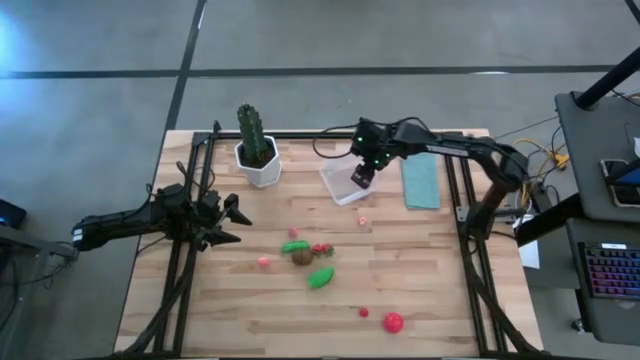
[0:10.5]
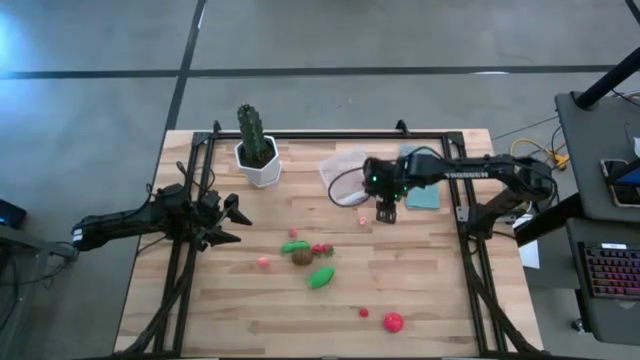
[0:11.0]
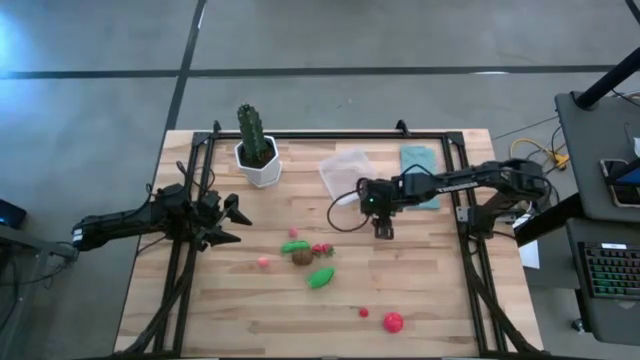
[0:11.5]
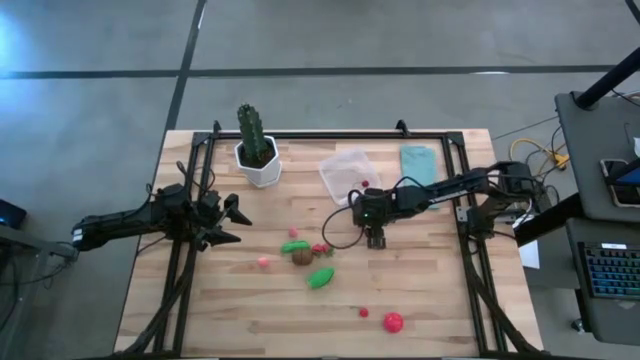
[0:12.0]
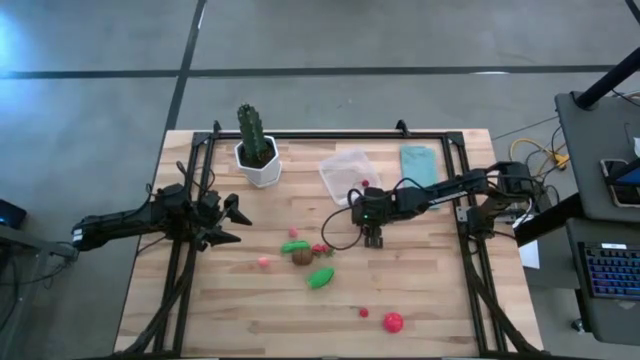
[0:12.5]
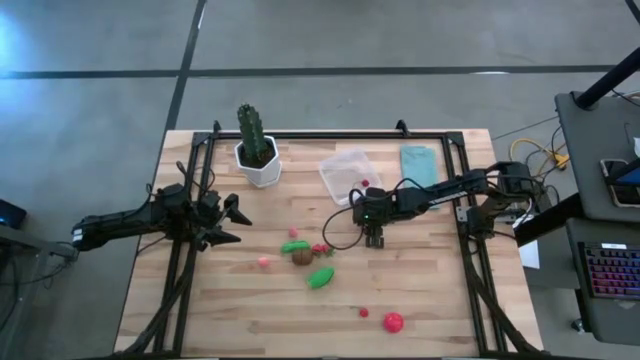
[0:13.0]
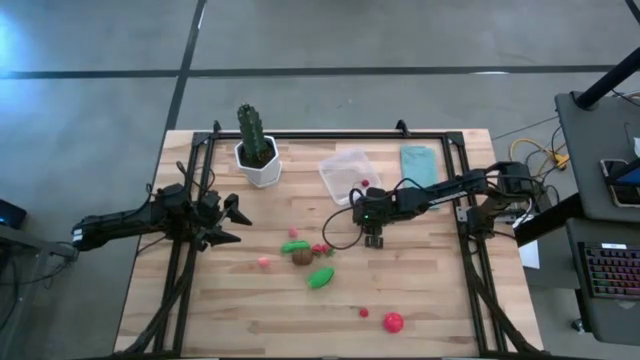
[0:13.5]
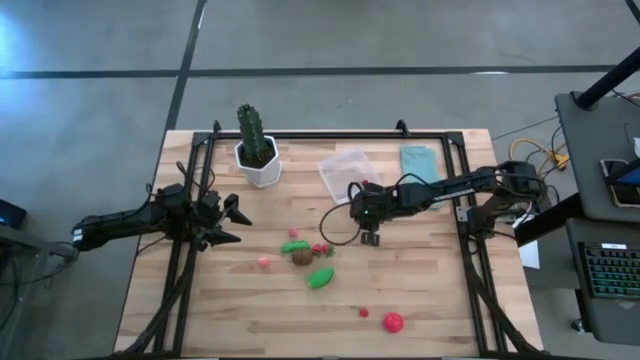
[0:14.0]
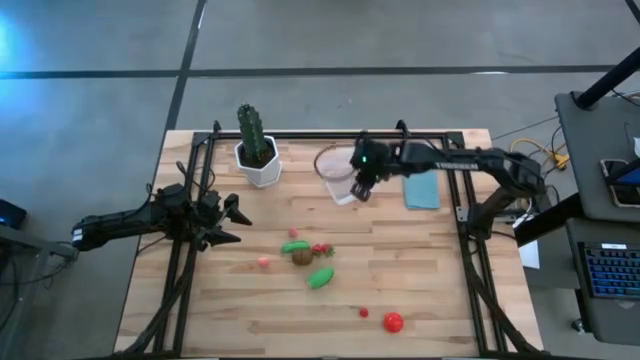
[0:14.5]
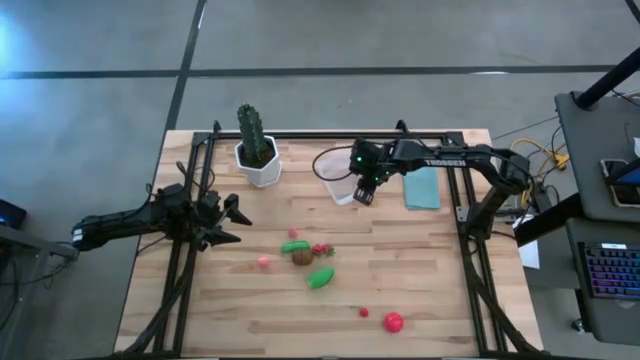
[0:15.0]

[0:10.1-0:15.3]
Task: Pick and placing Produce into tupperware
Put the top right peach into the transparent bin

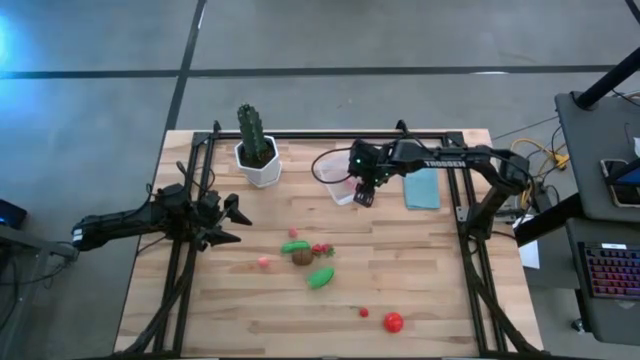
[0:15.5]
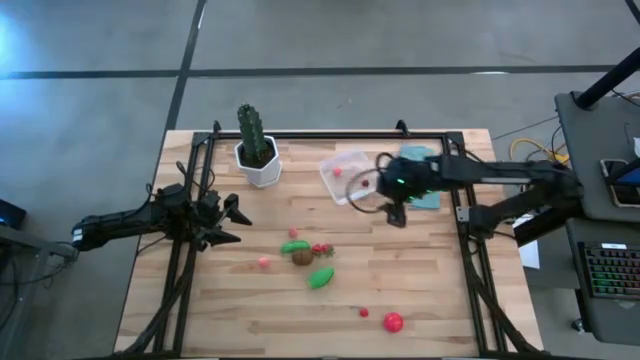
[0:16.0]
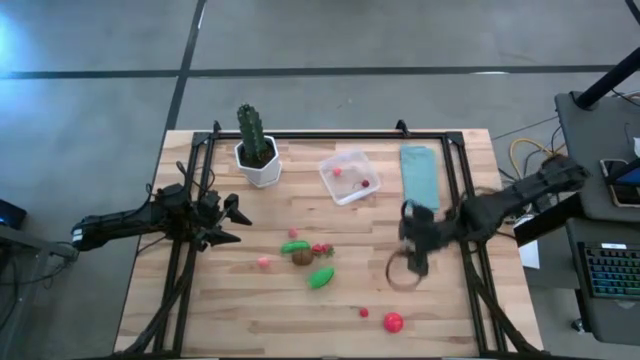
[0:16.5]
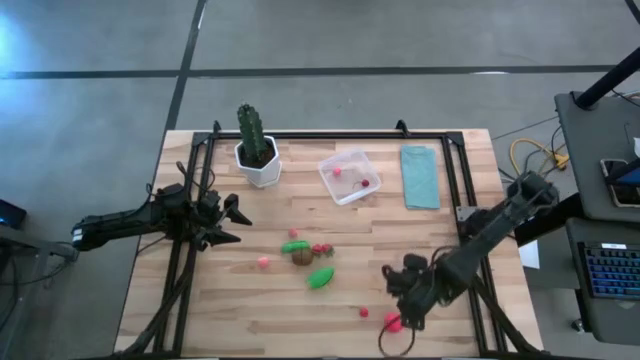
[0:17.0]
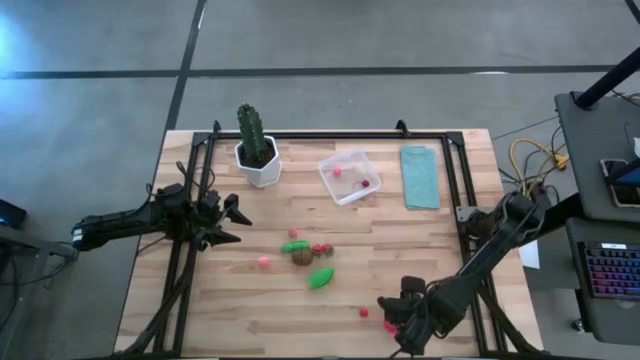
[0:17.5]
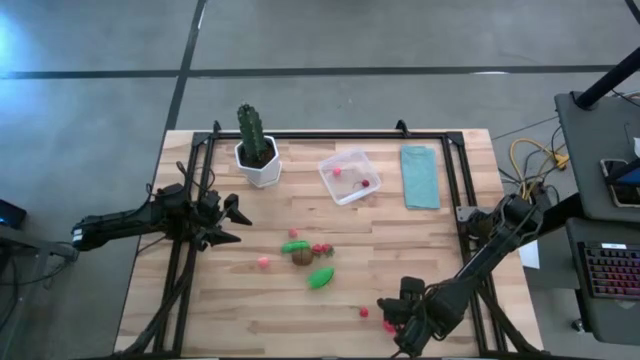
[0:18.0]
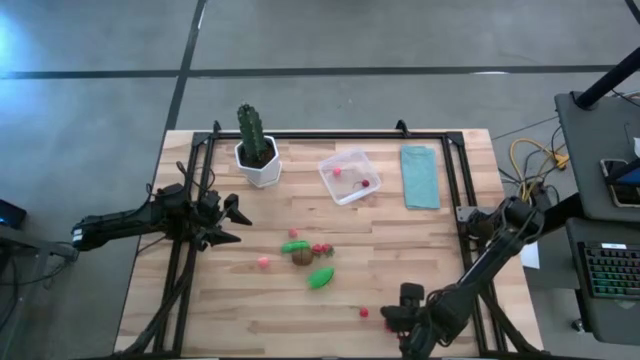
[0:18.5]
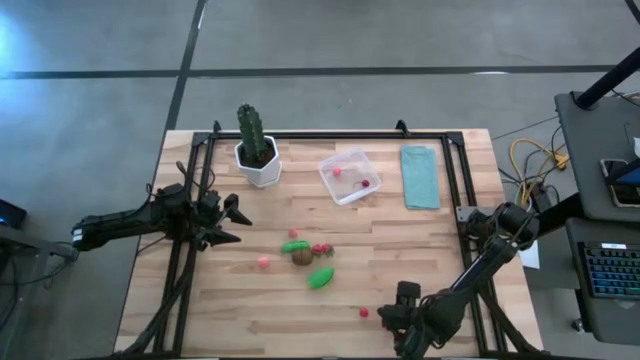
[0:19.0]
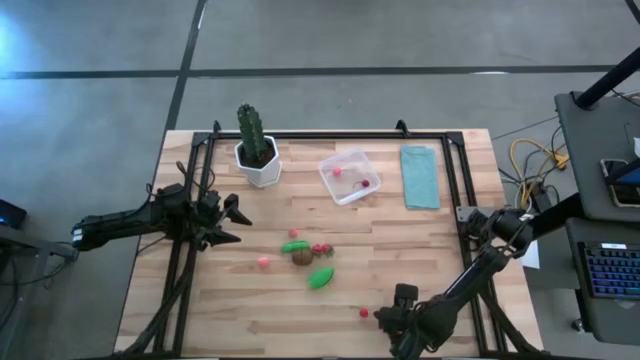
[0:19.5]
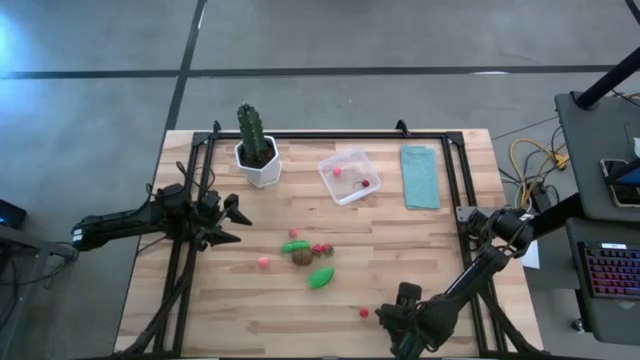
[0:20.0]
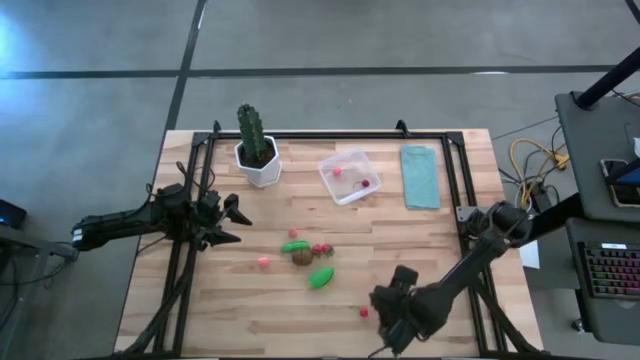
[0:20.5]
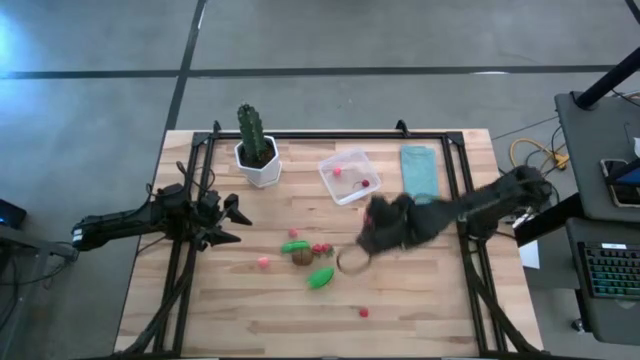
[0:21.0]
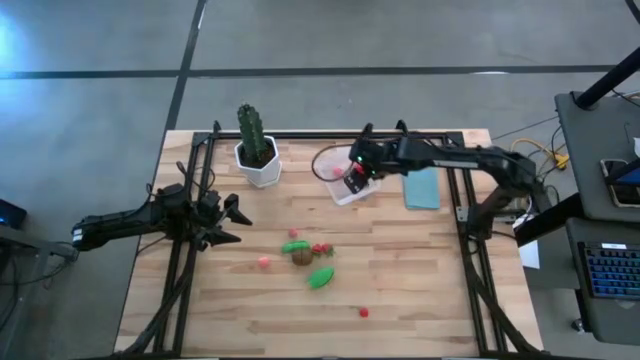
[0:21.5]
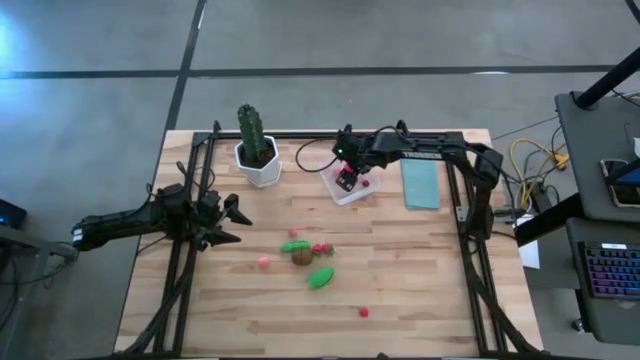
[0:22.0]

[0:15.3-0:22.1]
Put the tomato into the transparent bin

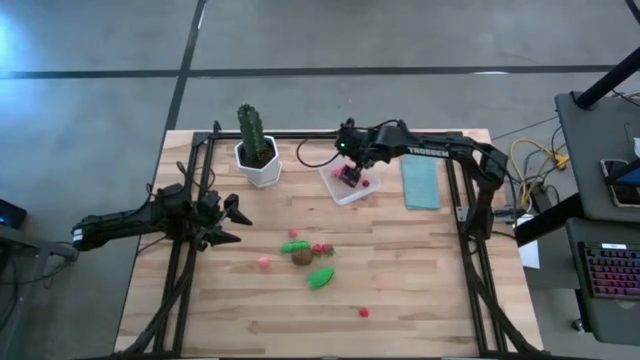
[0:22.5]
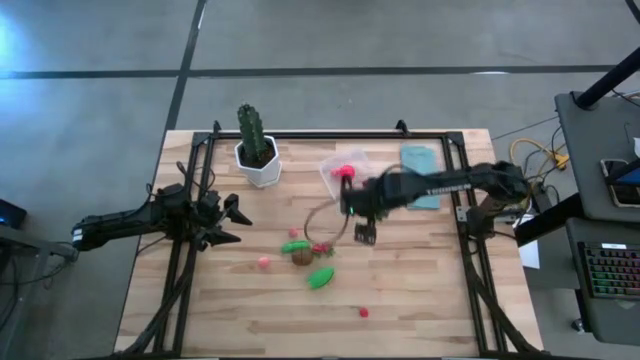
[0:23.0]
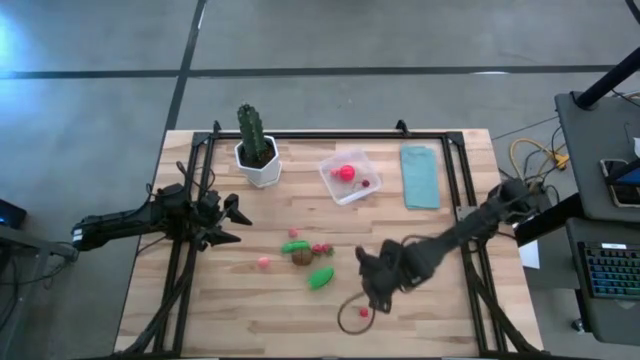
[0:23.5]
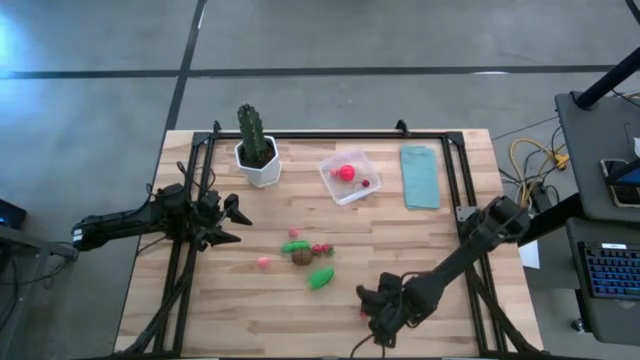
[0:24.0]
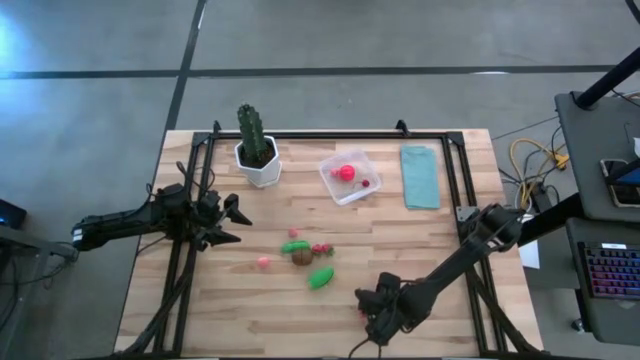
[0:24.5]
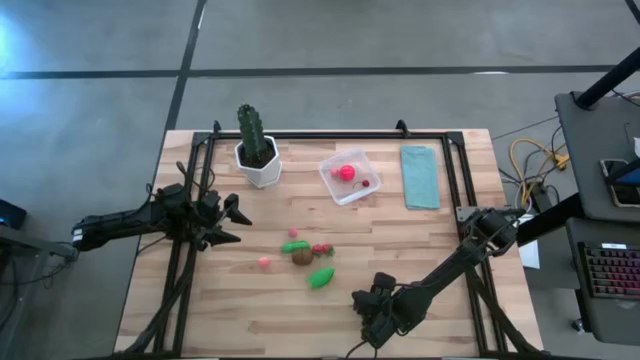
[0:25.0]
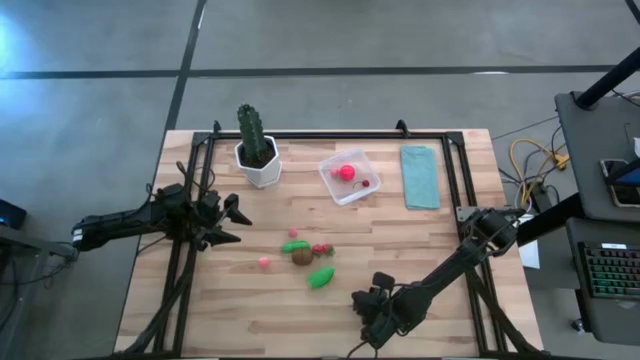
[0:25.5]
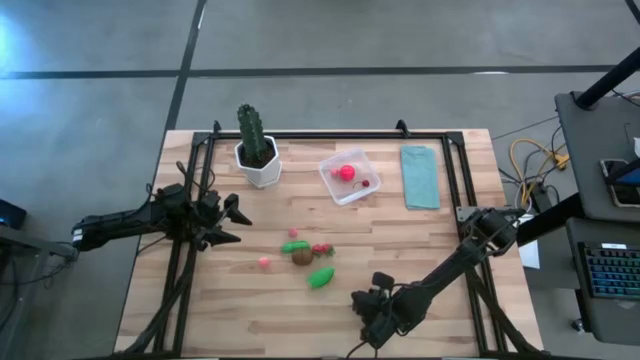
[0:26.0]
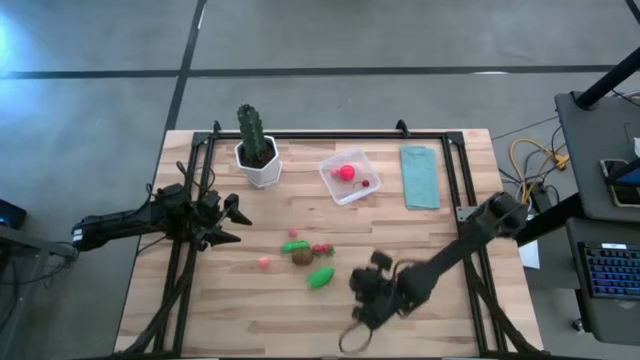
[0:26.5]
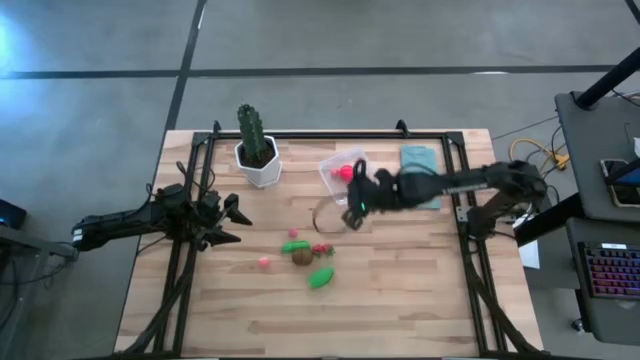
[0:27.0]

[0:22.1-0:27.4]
Put the cherry into the transparent bin

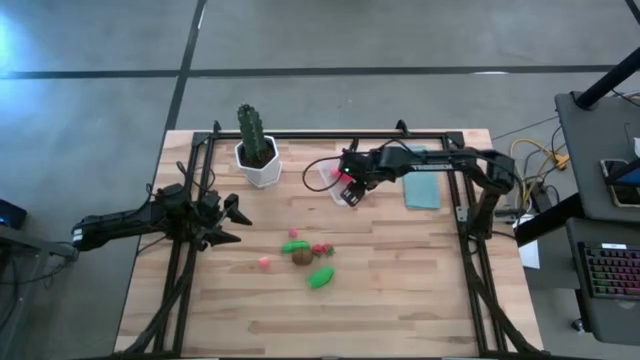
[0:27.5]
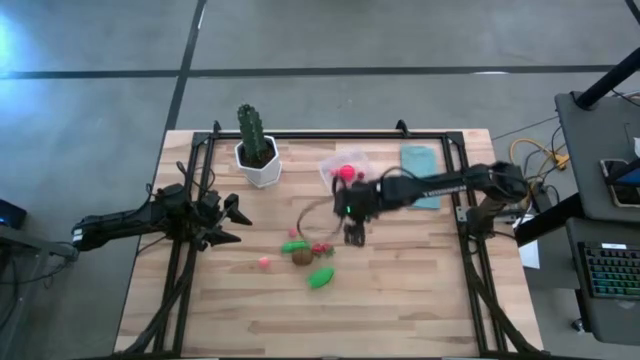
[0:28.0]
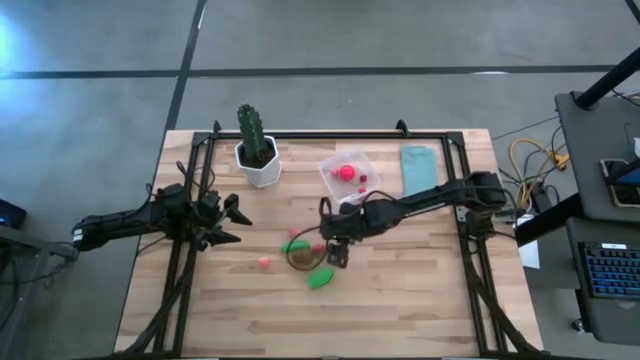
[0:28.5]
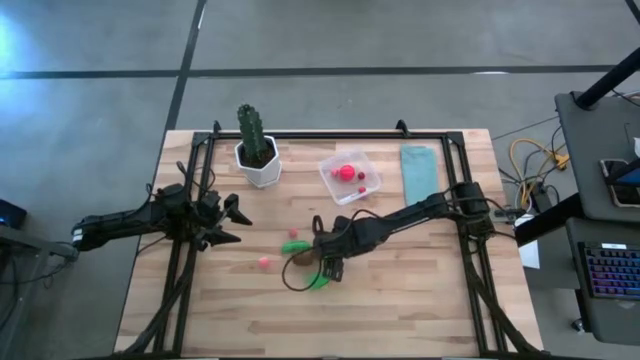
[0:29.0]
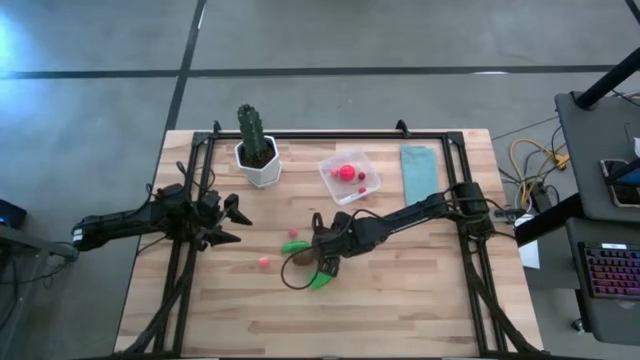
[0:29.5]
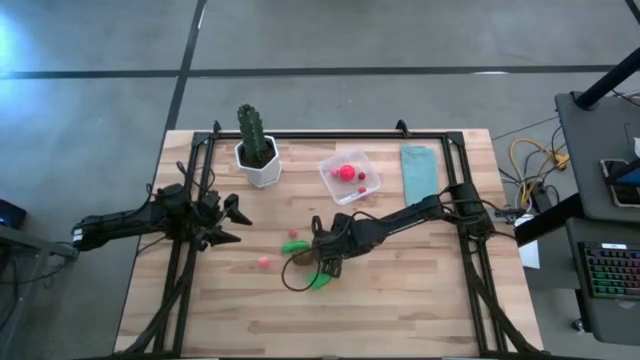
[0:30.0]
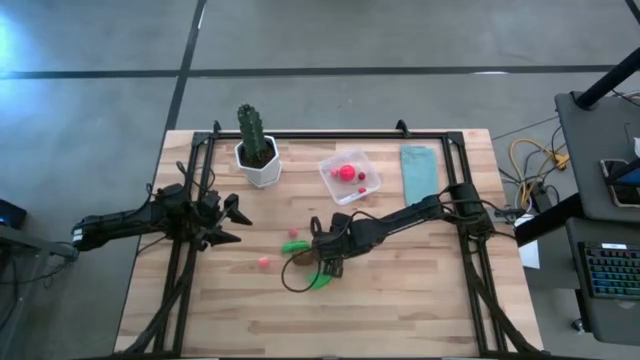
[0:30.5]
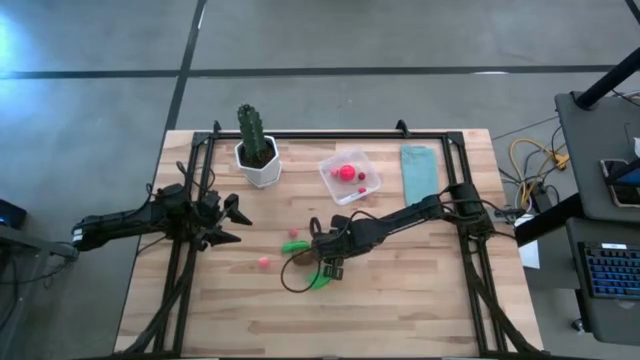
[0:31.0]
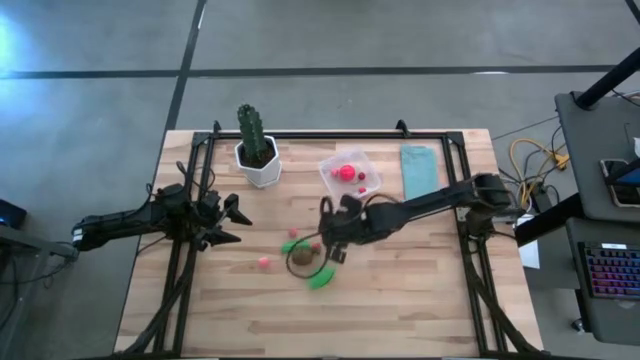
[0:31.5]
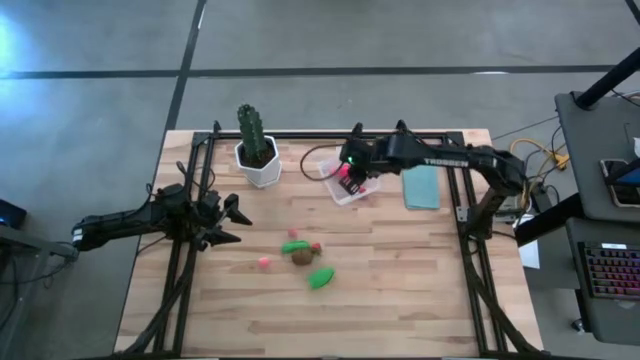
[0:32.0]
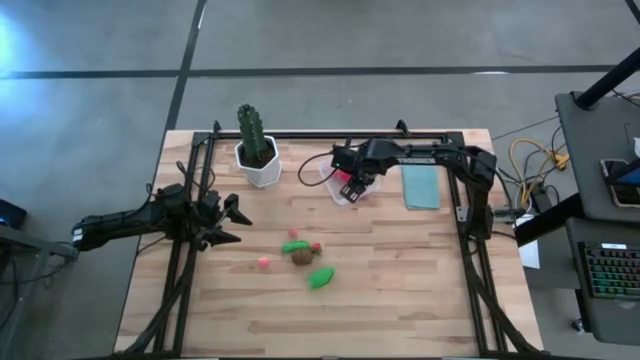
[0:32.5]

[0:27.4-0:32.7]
Put the right strawberry into the transparent bin
